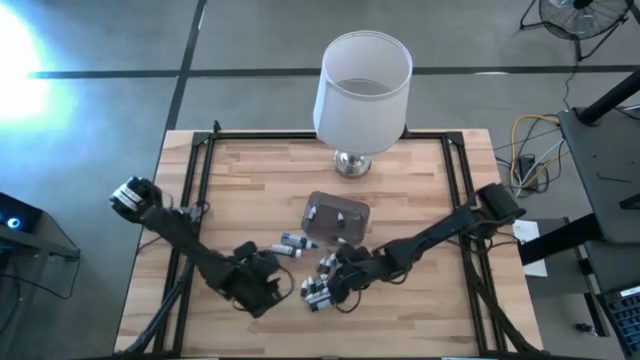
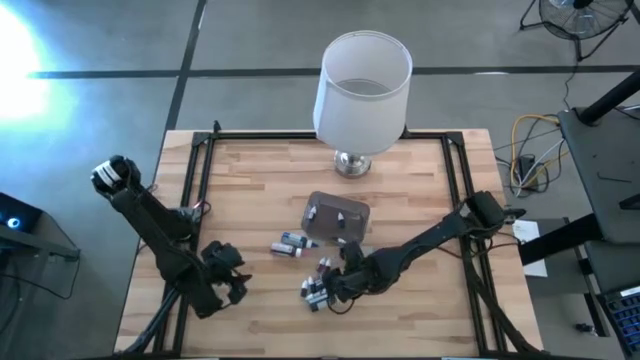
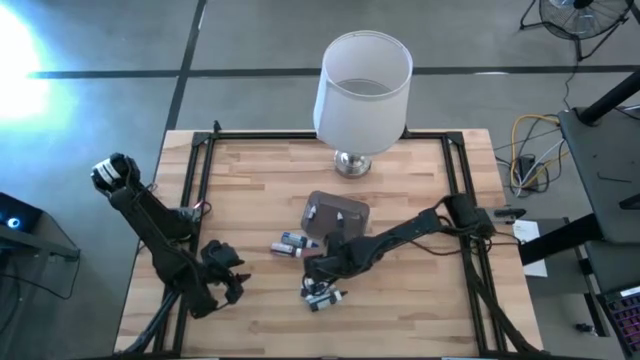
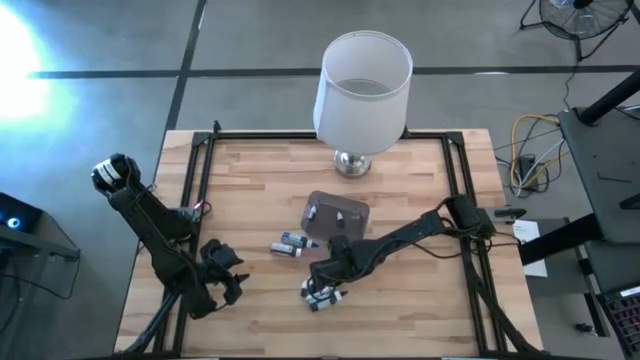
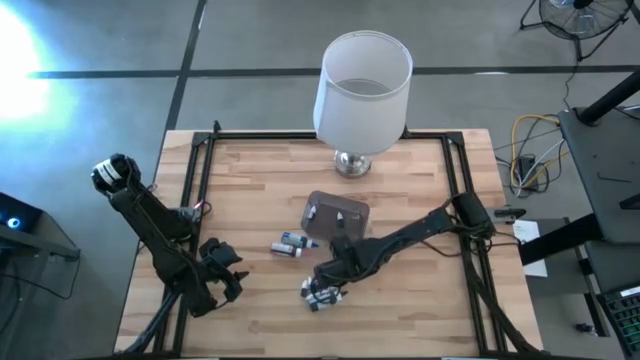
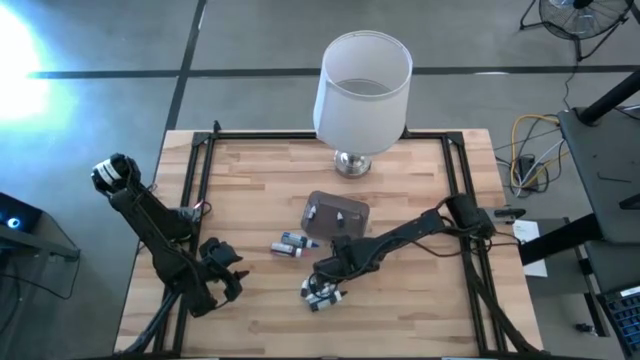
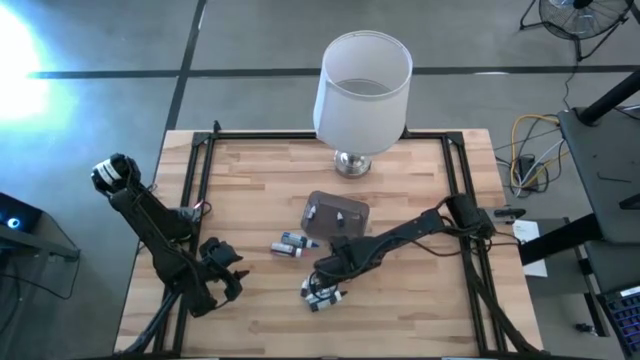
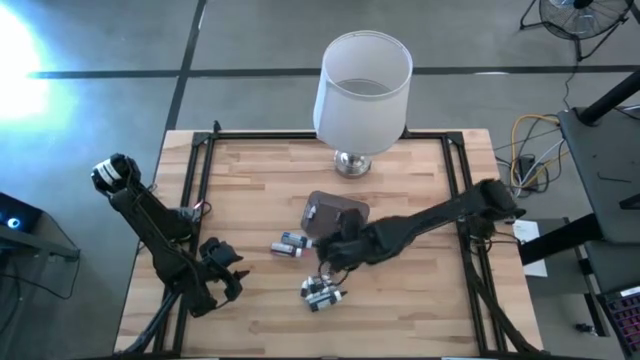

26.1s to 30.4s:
Task: Pick & Place food coloring
Put the small red food coloring into the black bin

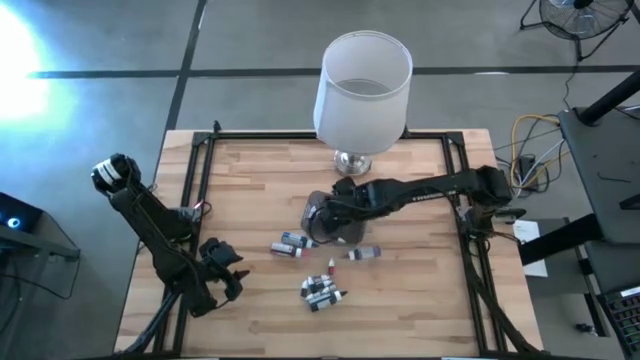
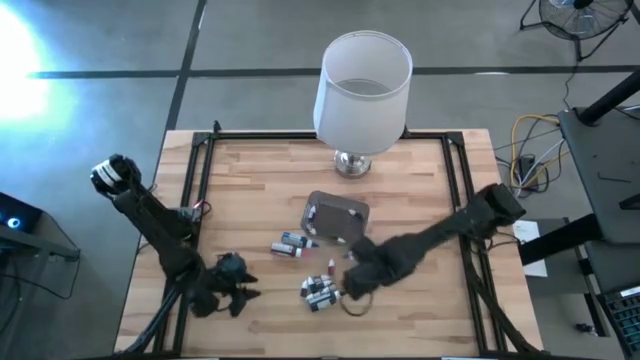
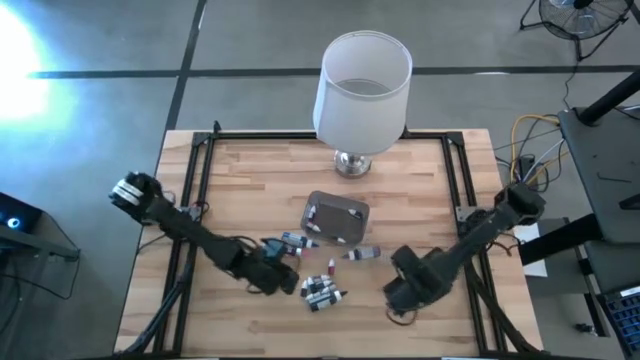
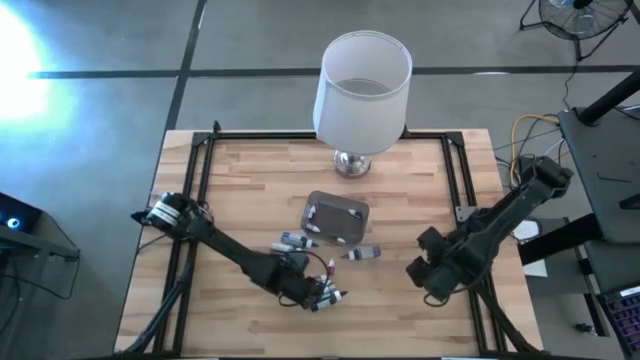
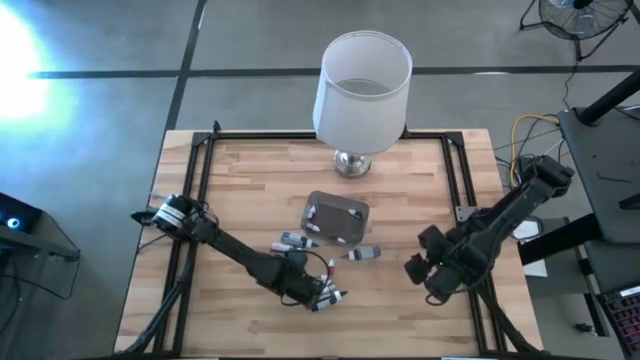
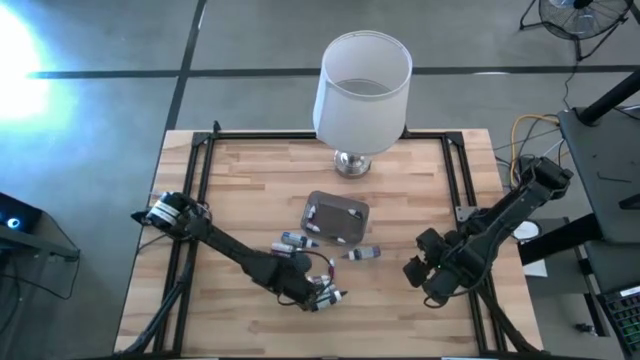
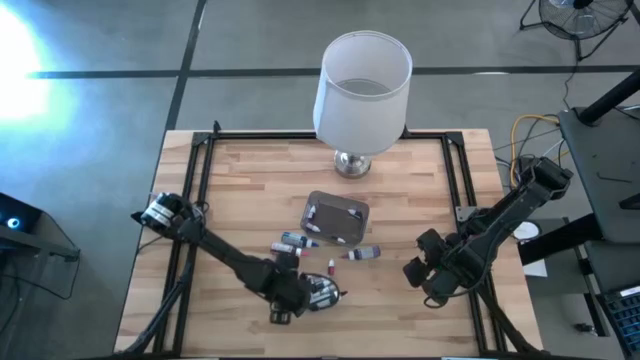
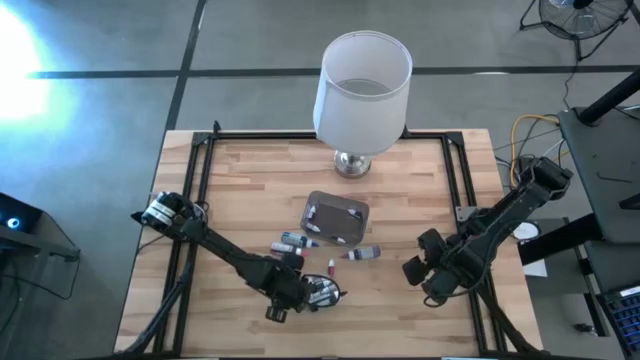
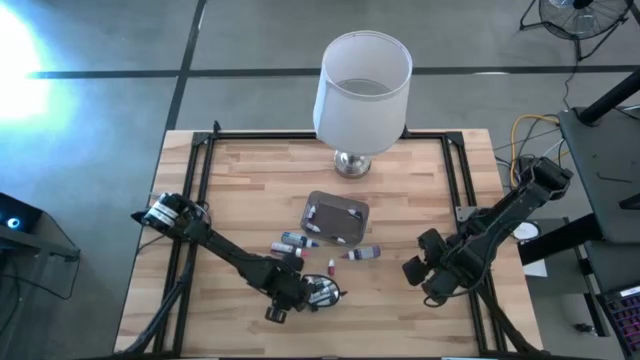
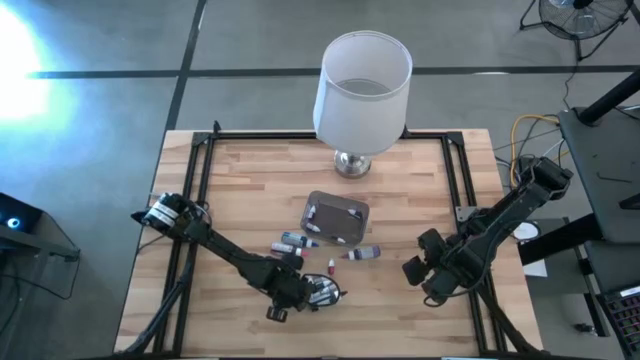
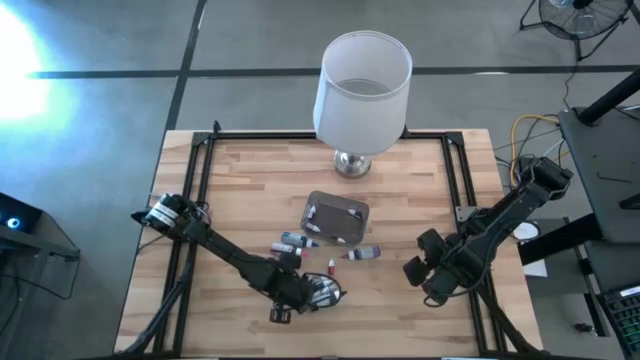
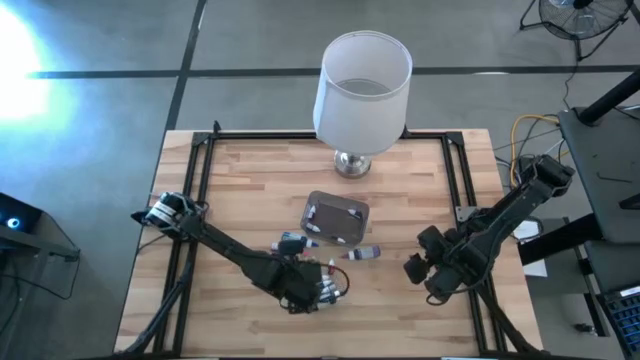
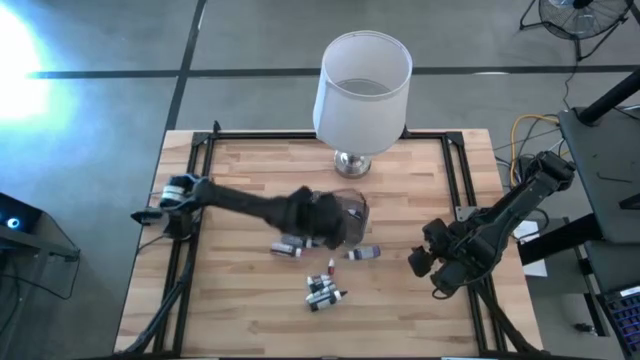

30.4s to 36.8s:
Put the small brown food coloring into the black bin

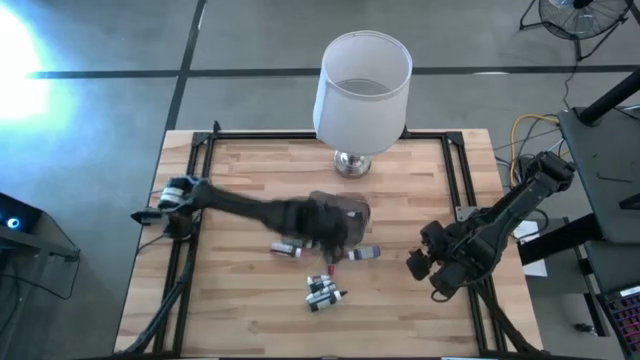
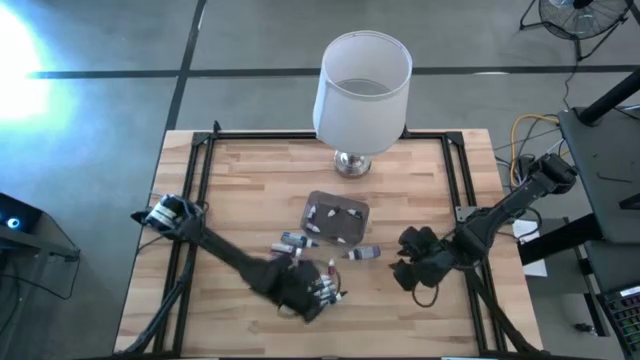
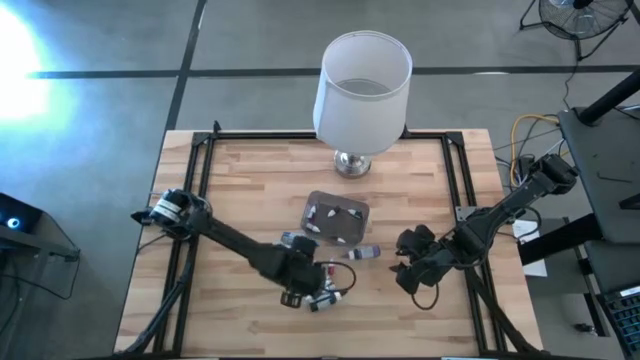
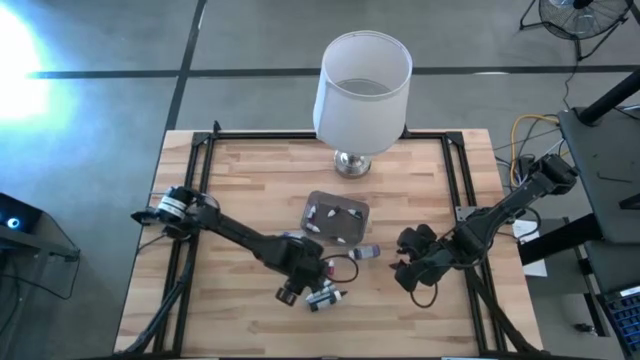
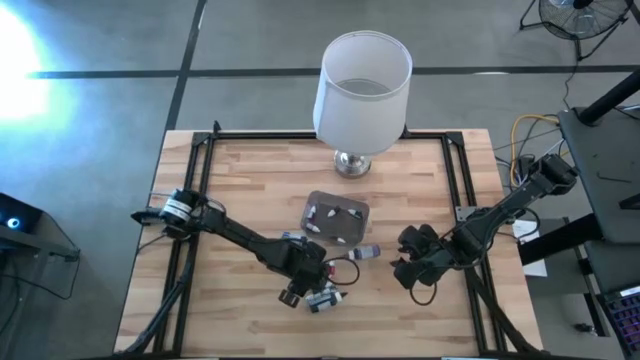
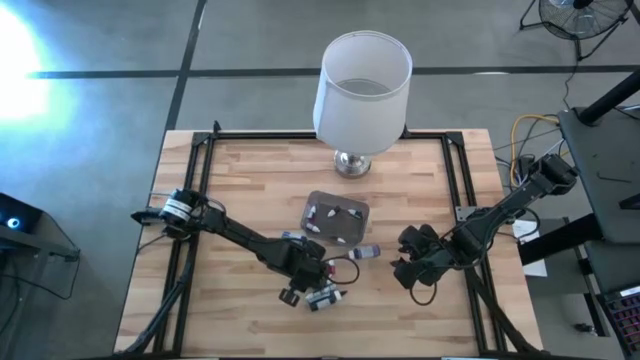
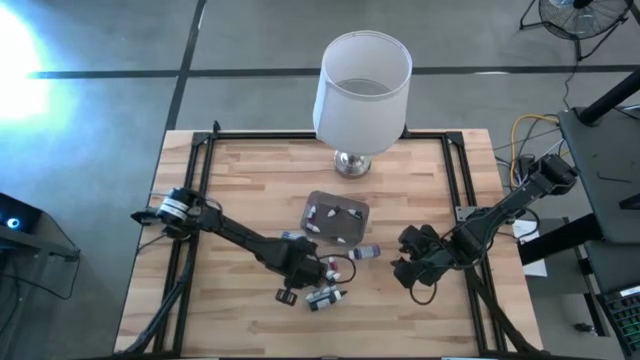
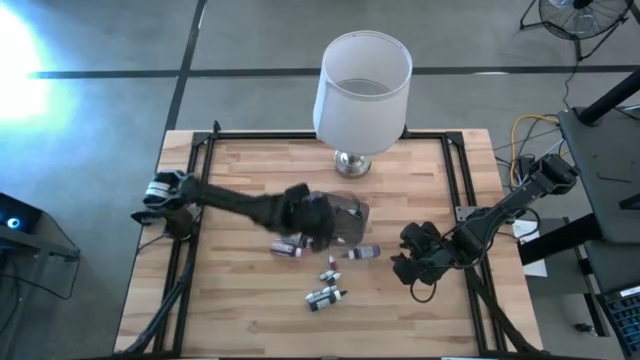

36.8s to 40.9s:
Put the small dark green food coloring into the black bin

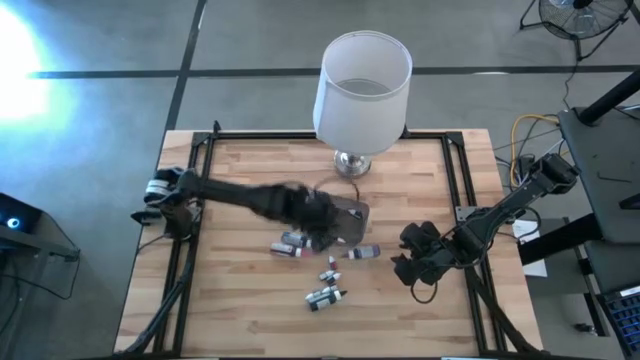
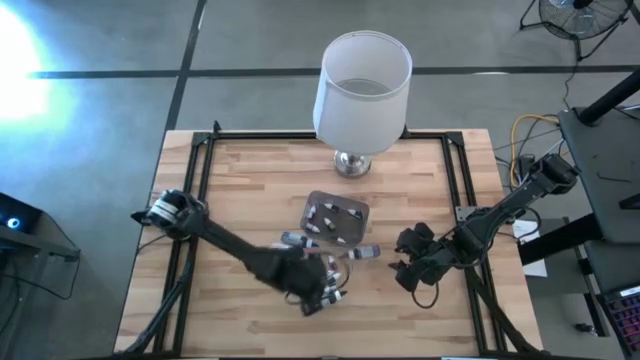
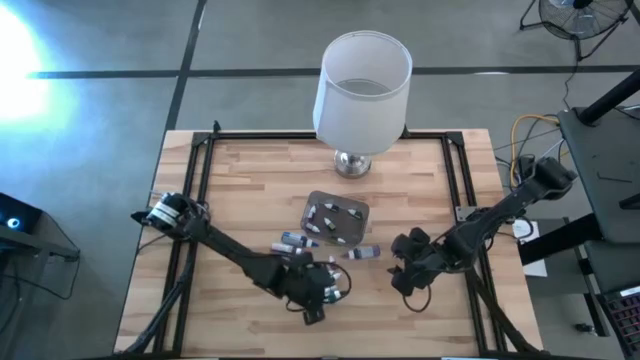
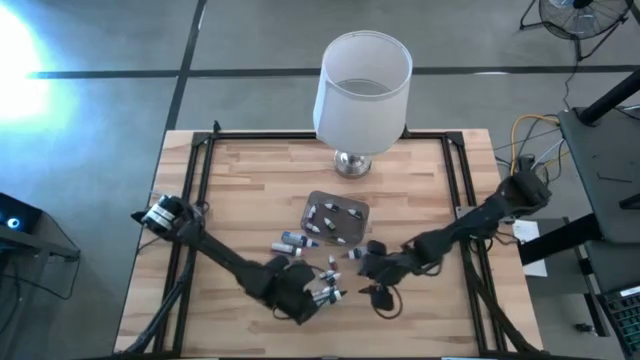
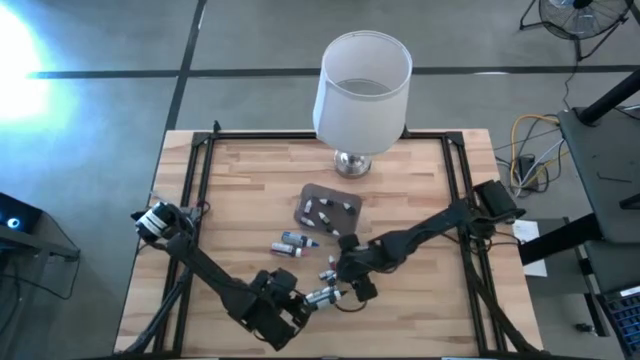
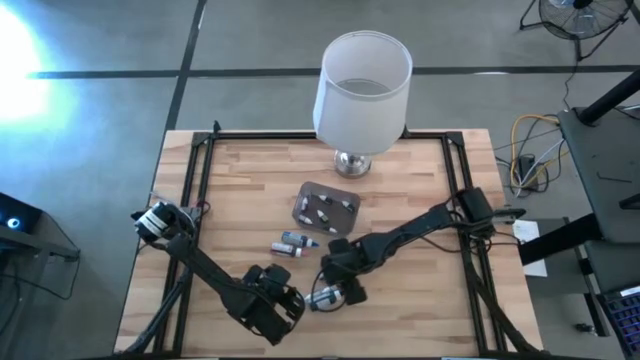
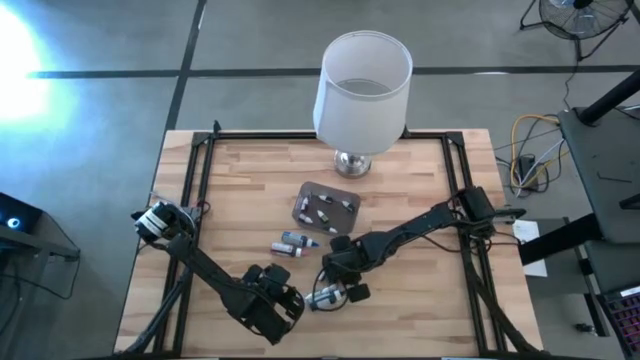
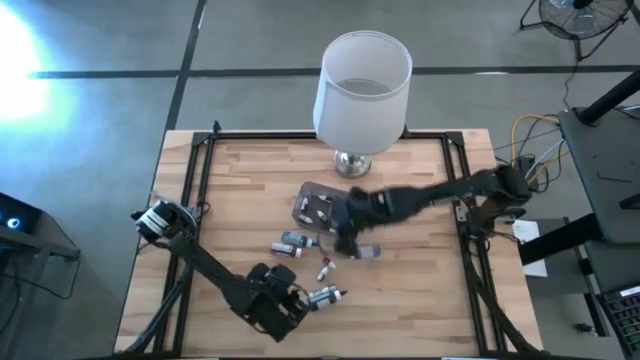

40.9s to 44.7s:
Put the small violet food coloring into the black bin

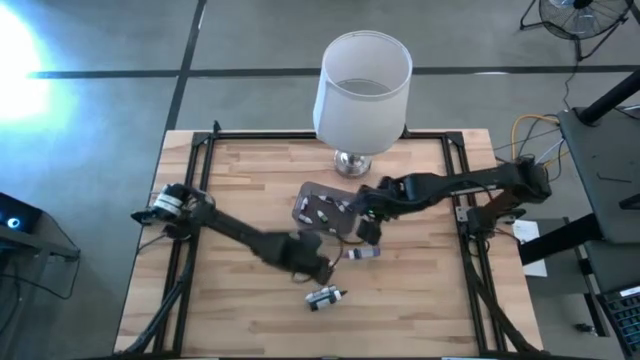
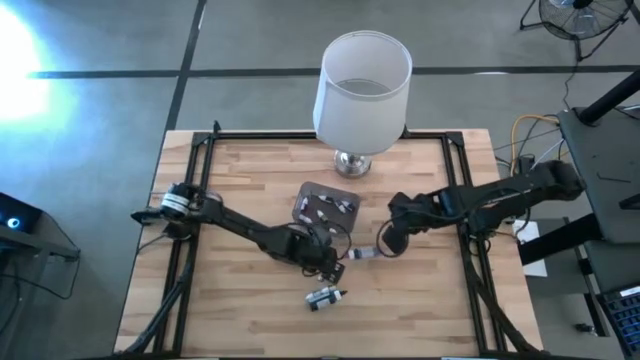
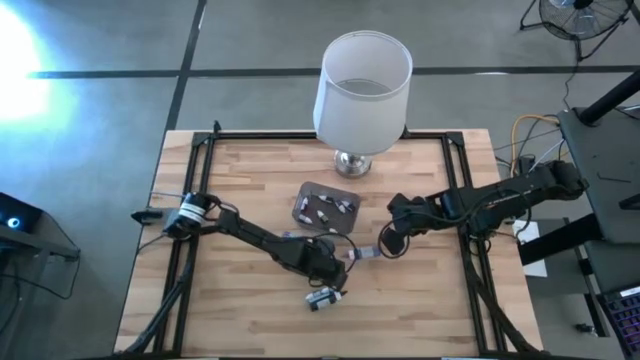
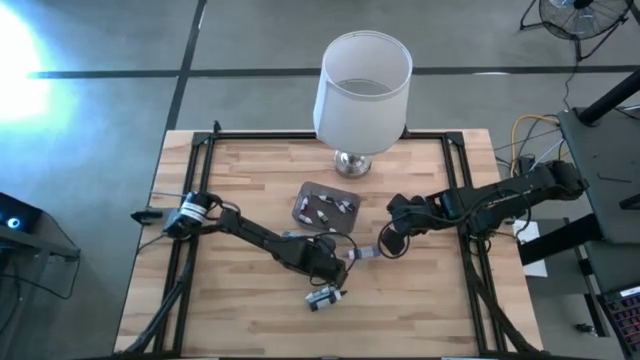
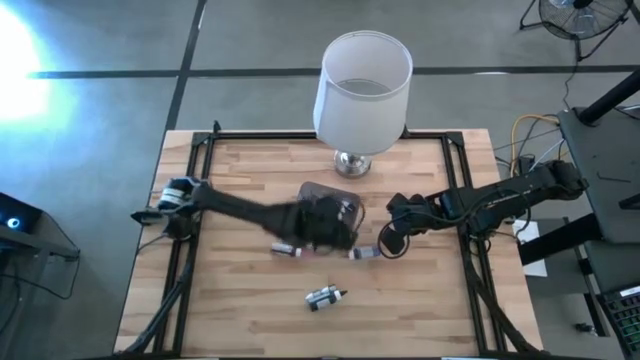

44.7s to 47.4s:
Put the small violet food coloring into the black bin

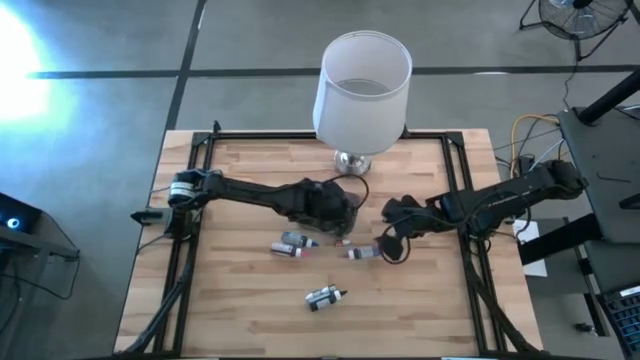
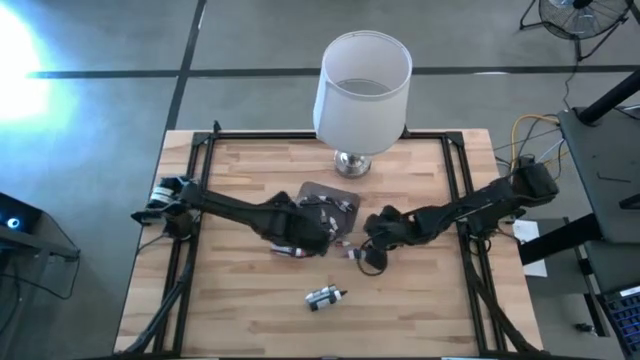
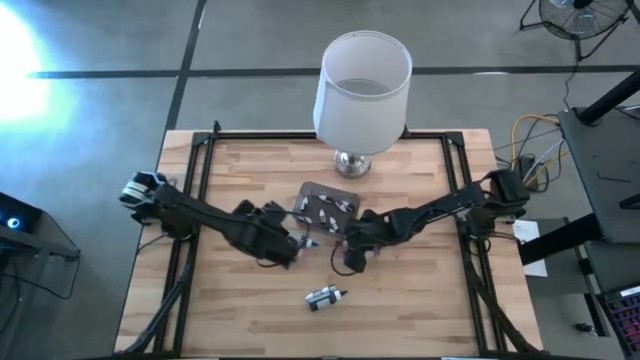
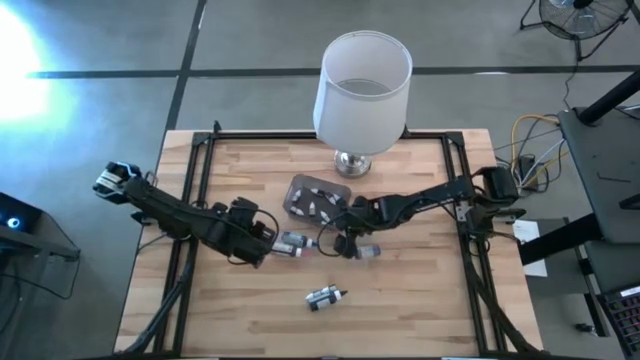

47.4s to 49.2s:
Adjust the black bin on the table
